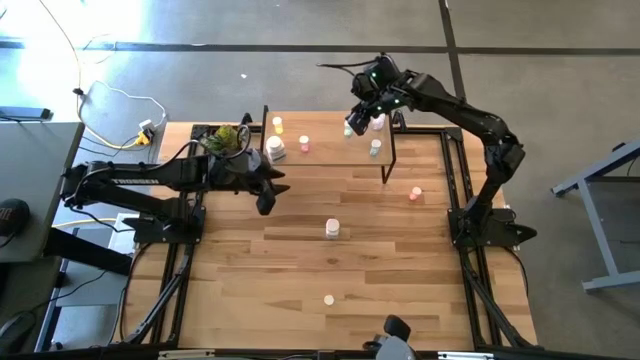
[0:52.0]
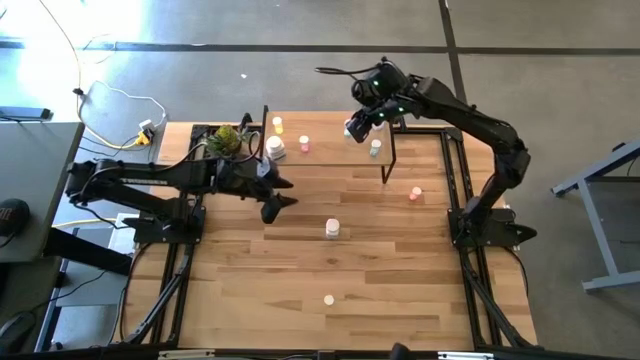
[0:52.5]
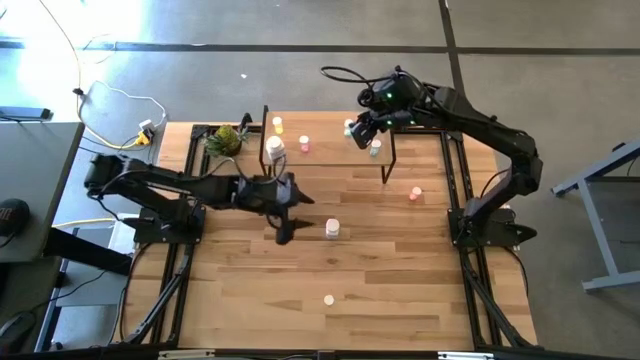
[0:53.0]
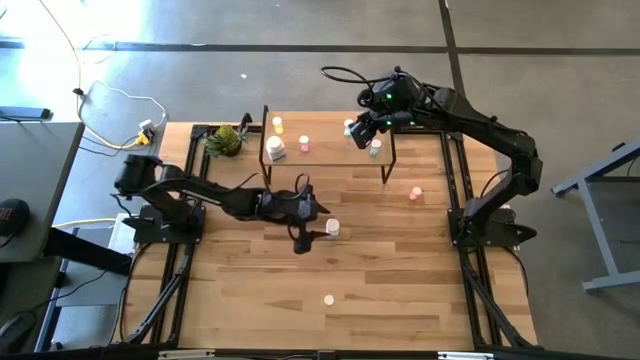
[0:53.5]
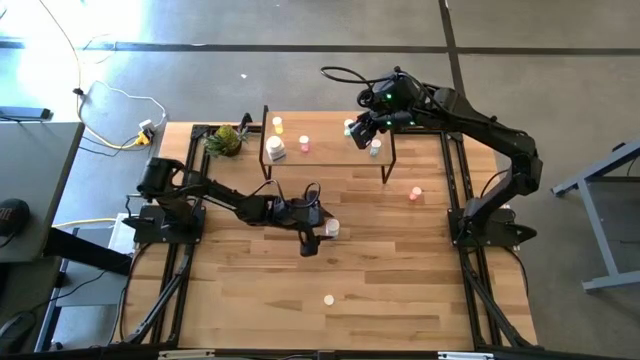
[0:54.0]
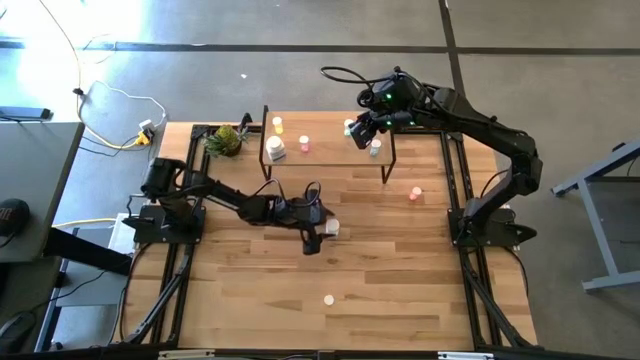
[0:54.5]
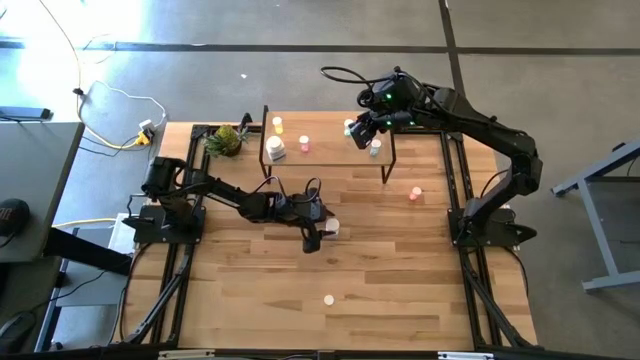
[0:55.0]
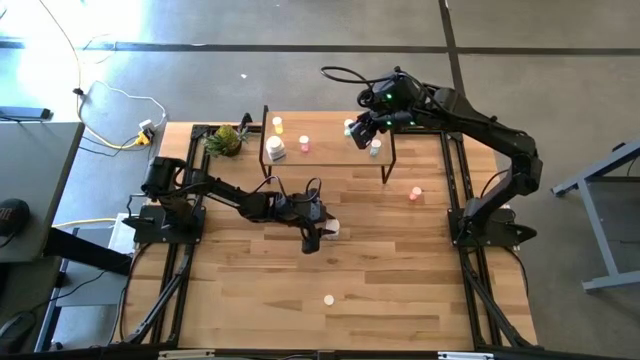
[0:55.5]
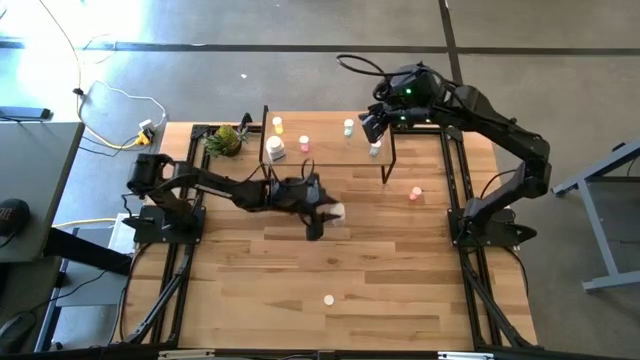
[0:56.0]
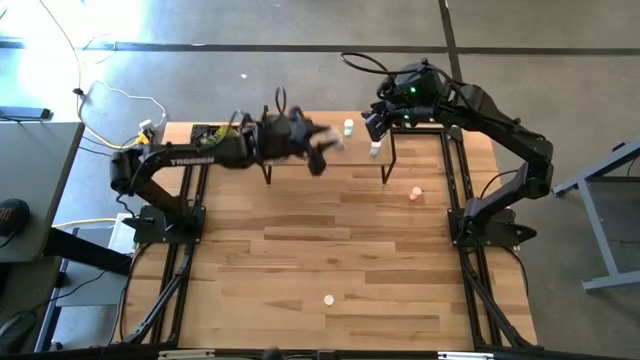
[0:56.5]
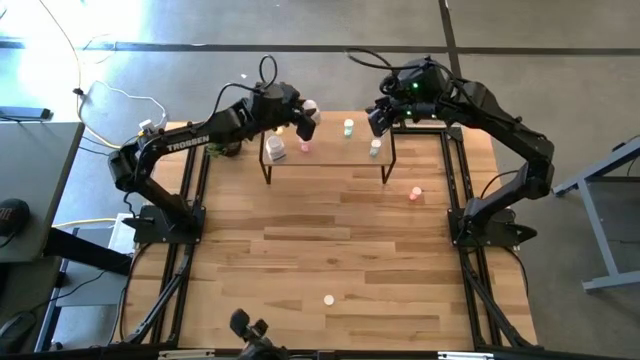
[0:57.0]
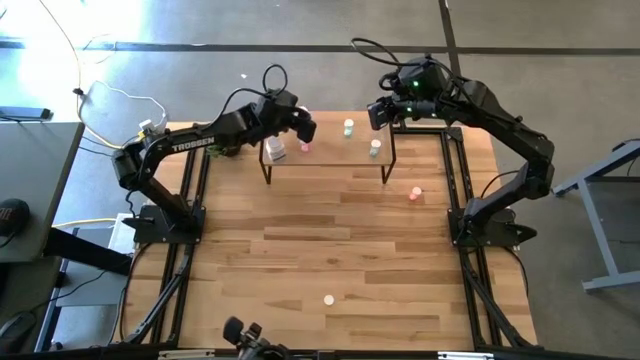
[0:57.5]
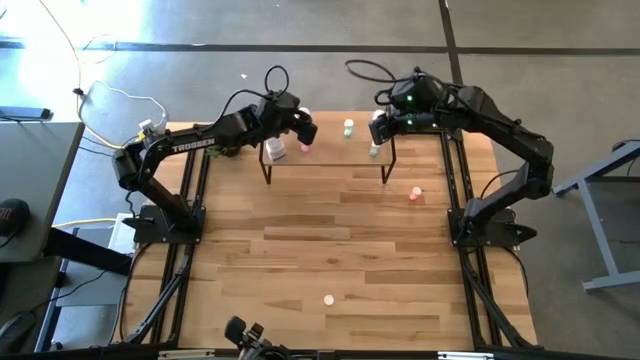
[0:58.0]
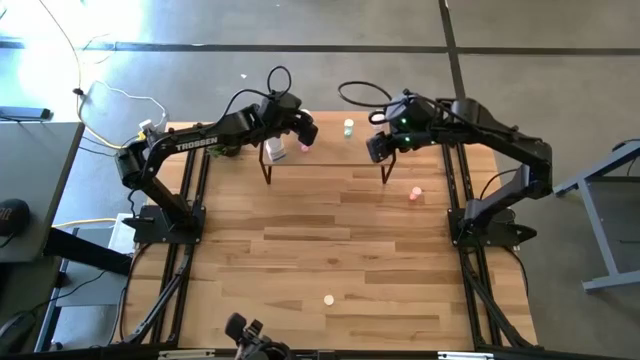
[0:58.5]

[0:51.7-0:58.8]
Task: Pick and place medicine bottles onto shelf by color
Put the white and blue medicine bottle on the shelf

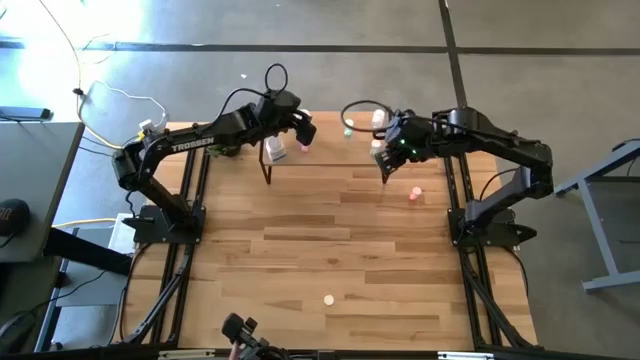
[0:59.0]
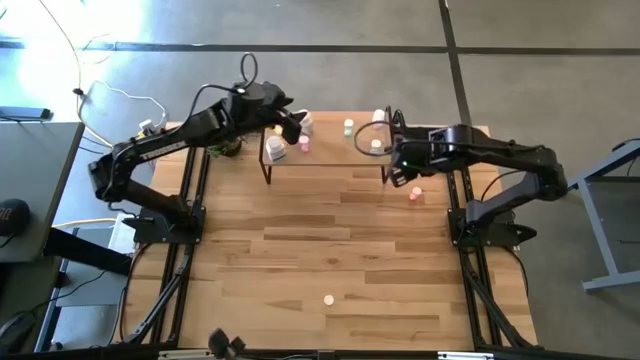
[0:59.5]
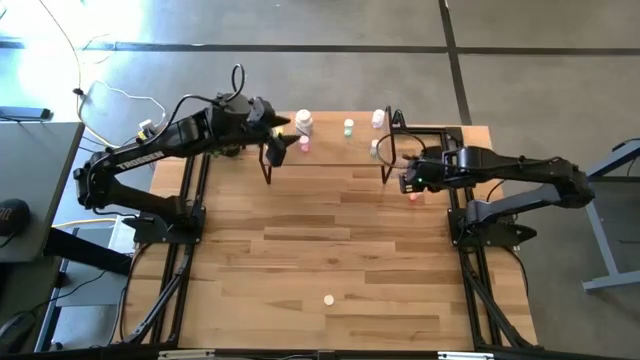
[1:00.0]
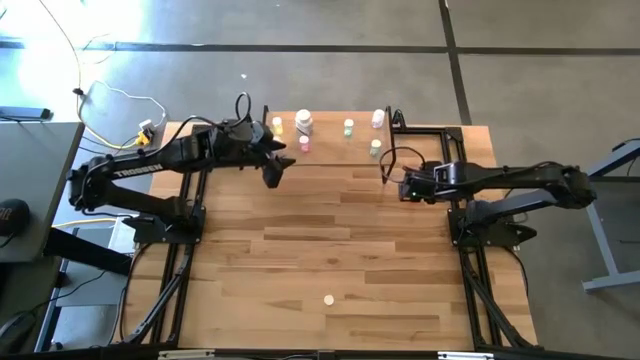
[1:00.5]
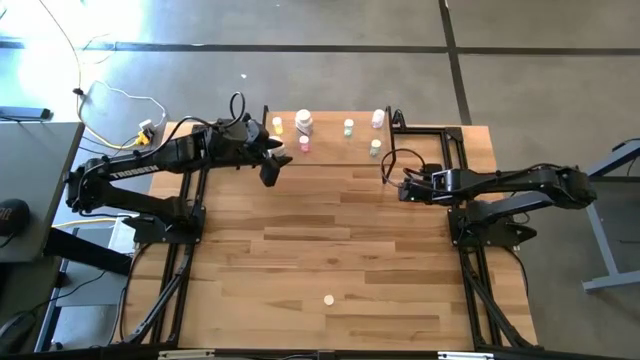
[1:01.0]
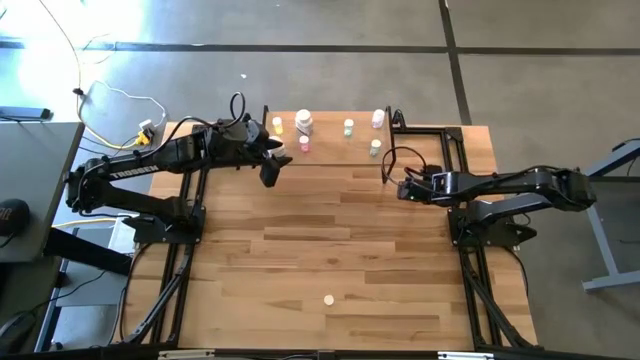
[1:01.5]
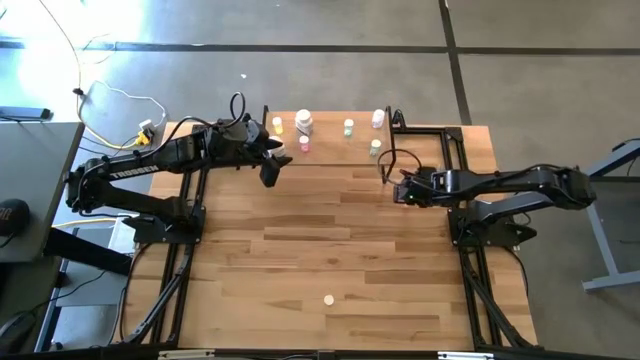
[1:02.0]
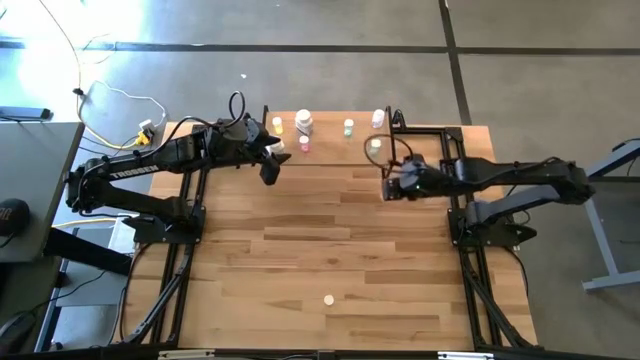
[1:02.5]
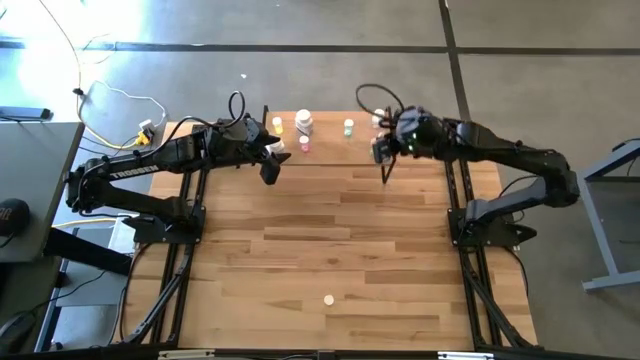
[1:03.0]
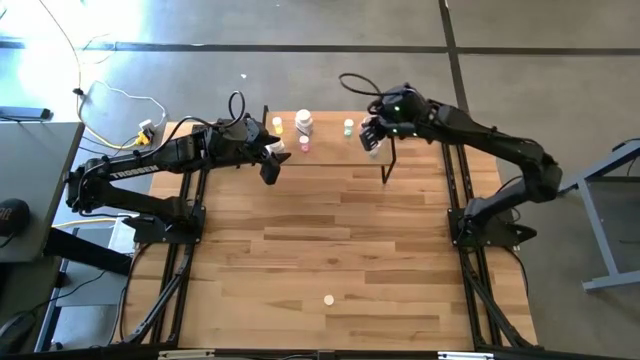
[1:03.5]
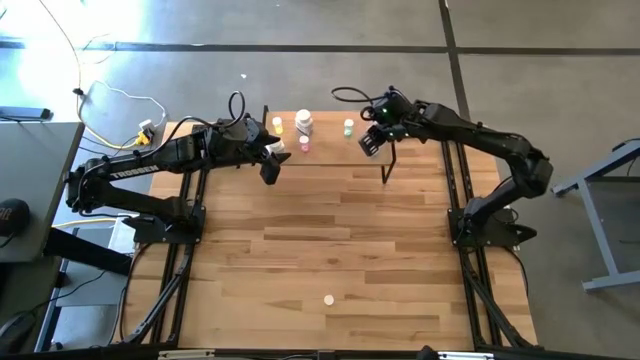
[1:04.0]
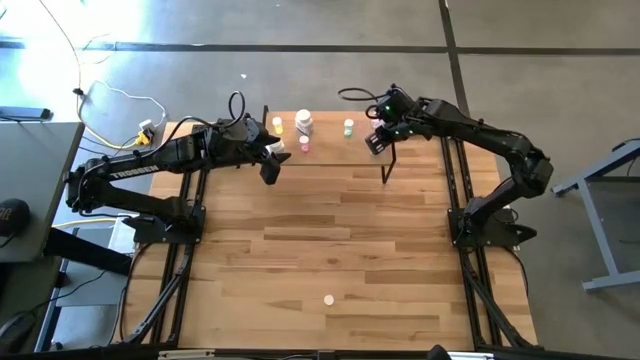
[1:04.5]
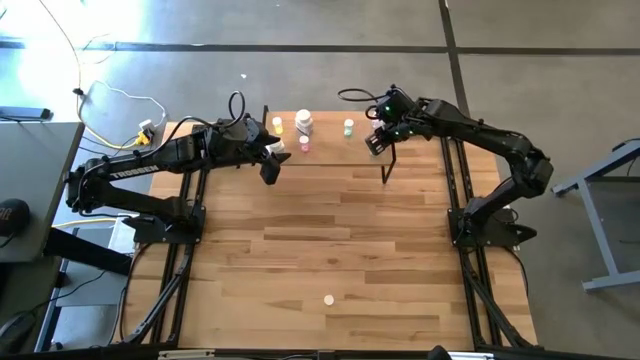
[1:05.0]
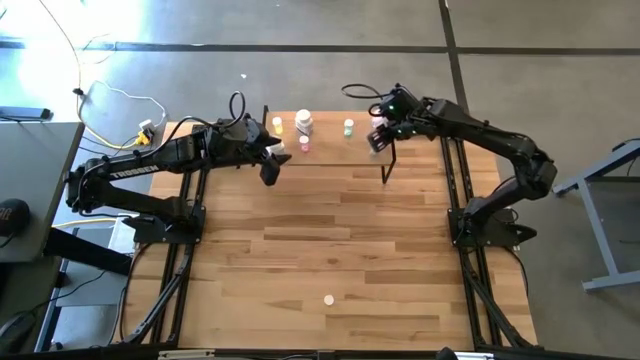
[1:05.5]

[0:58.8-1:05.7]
Put the pink medicine bottle on the shelf

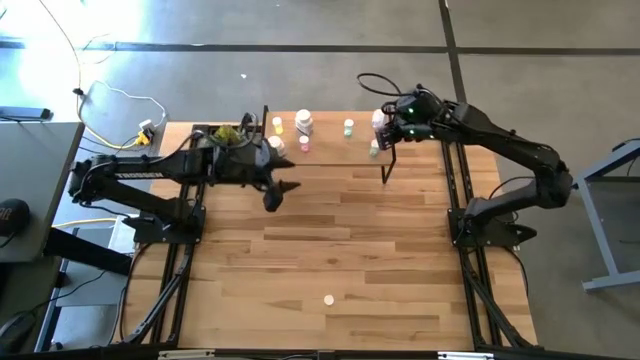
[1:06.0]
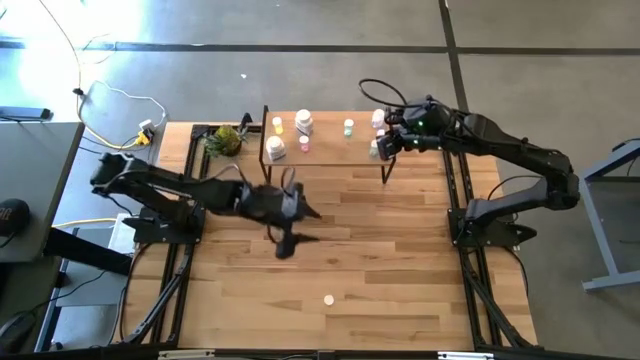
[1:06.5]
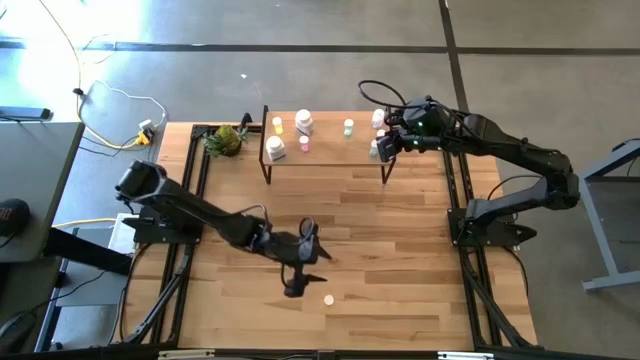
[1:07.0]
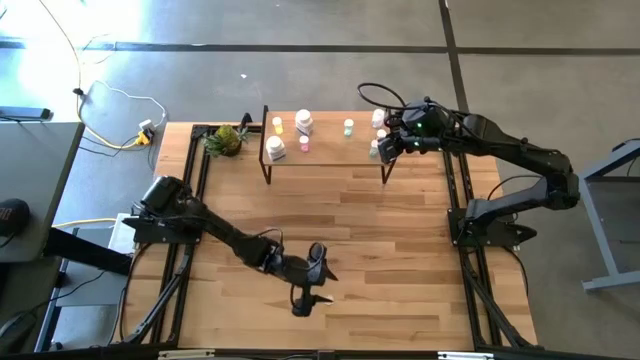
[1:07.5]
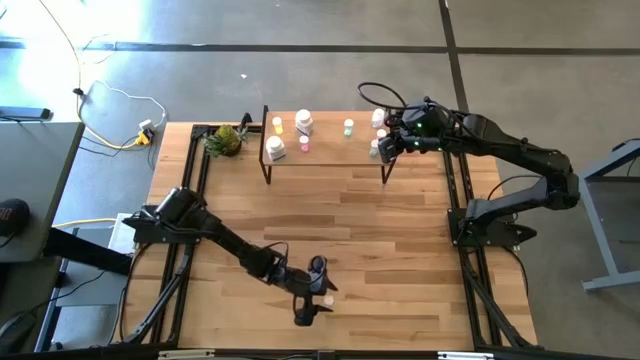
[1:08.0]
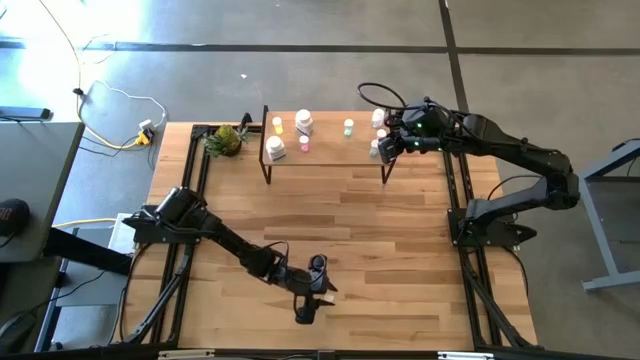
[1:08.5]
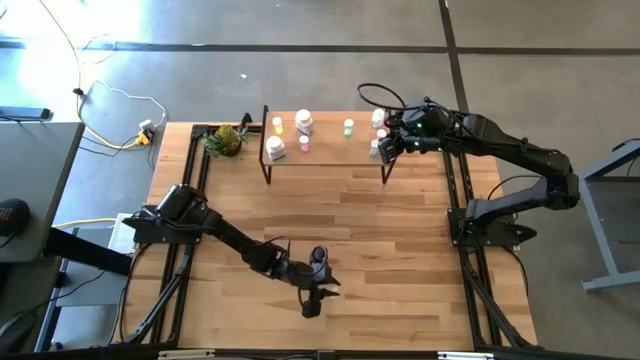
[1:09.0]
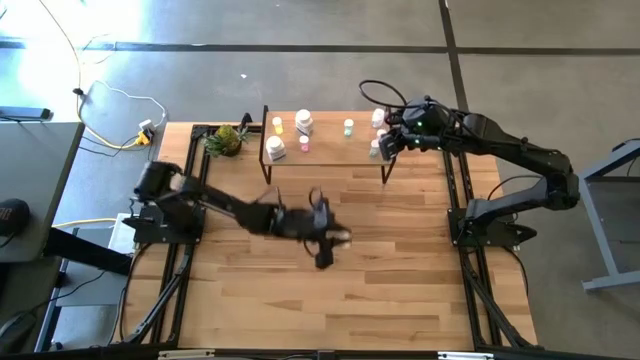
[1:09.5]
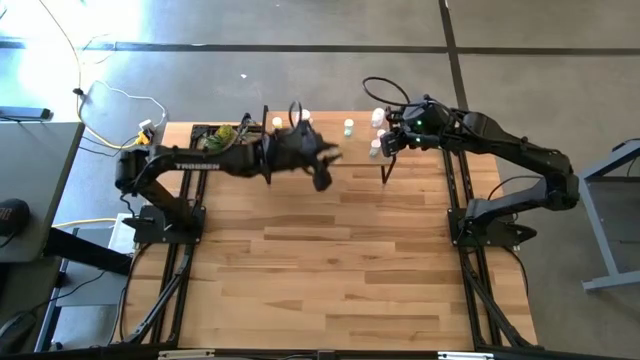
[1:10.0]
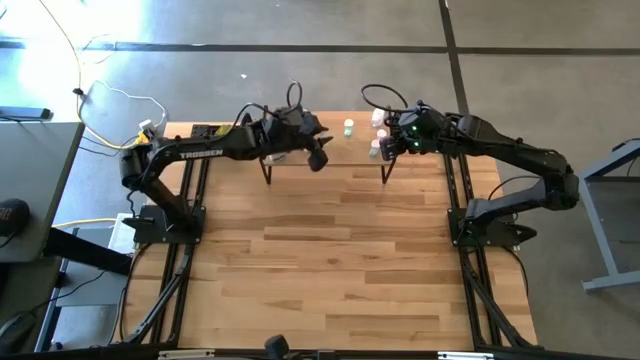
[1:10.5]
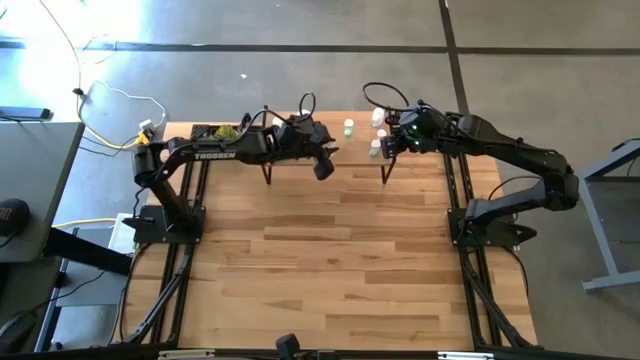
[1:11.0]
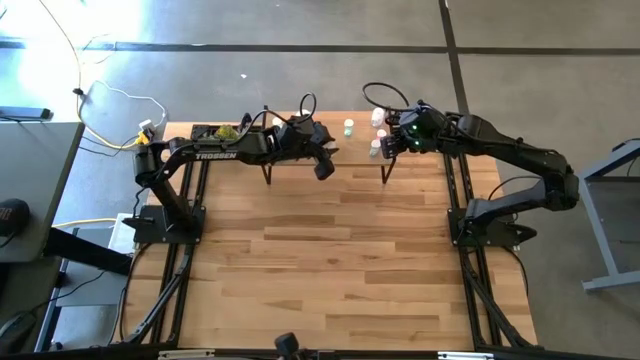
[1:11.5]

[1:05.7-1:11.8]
Put the yellow medicine bottle on the shelf

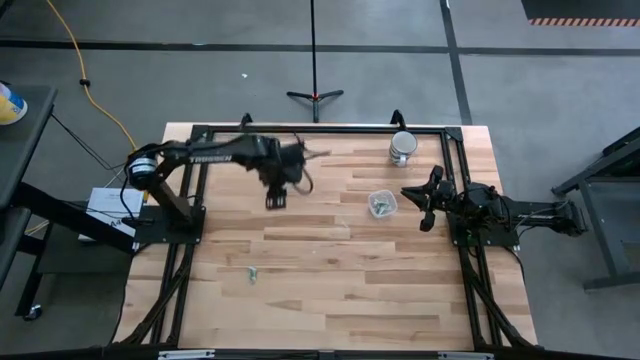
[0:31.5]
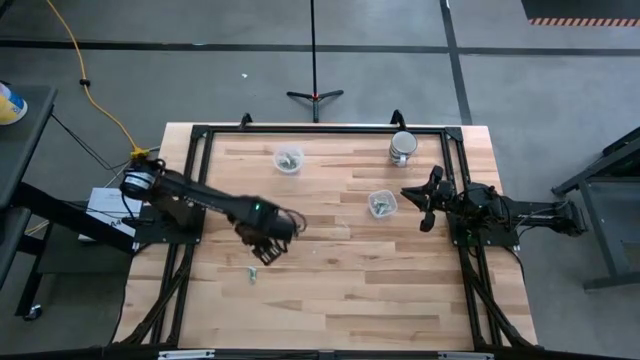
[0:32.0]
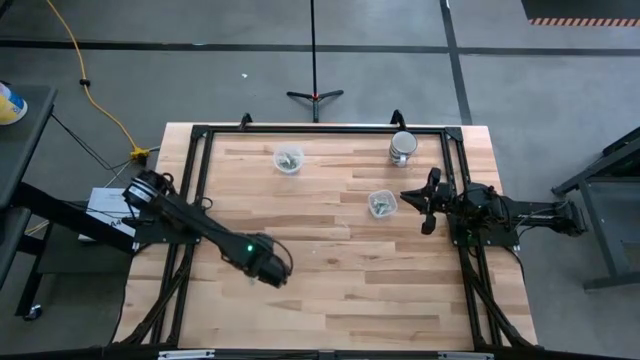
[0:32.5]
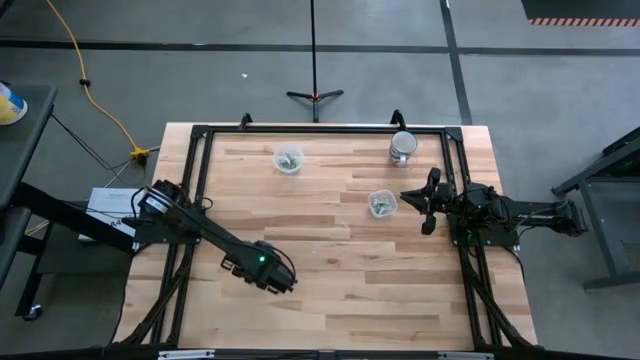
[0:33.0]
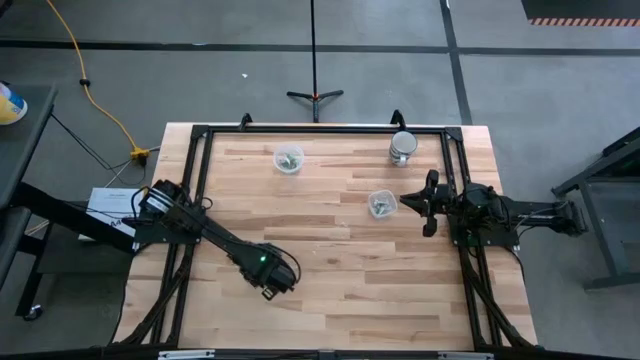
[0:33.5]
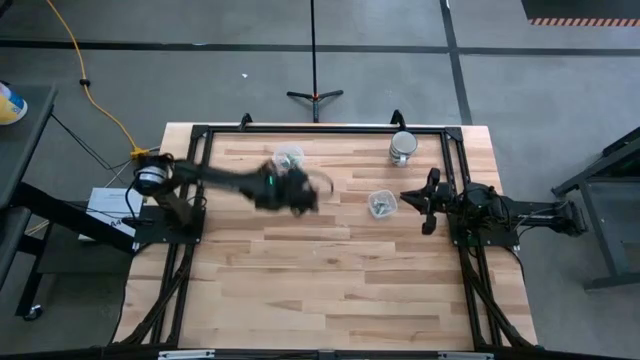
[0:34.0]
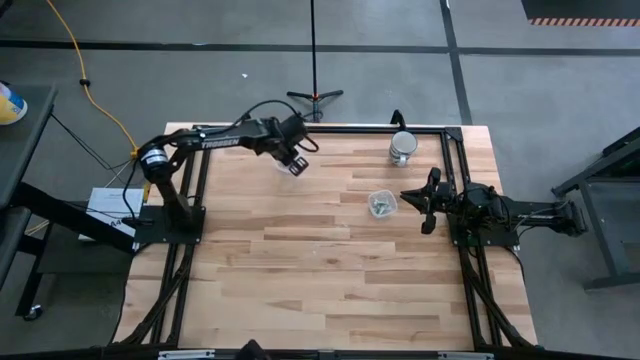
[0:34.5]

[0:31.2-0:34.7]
Task: Pick and place Stevia / Truvia into bins
Put the stevia packet into the round transparent container
